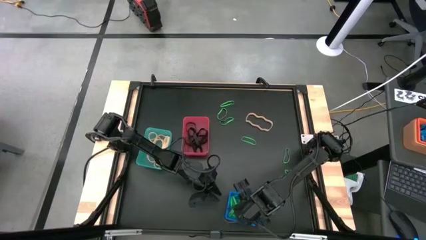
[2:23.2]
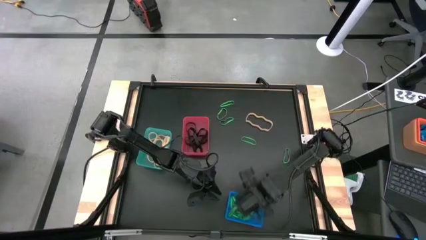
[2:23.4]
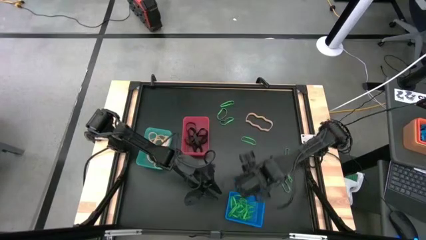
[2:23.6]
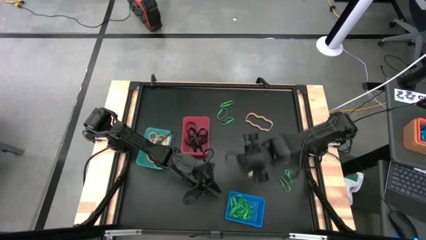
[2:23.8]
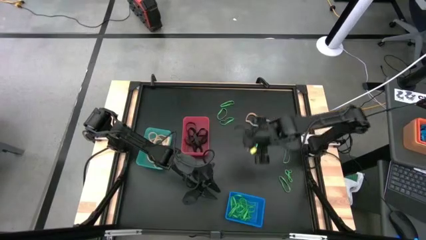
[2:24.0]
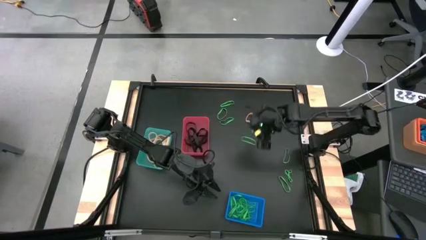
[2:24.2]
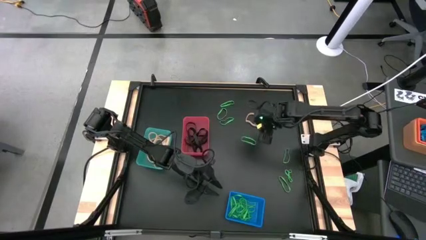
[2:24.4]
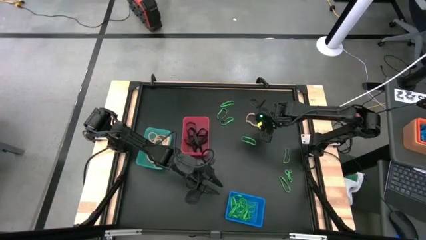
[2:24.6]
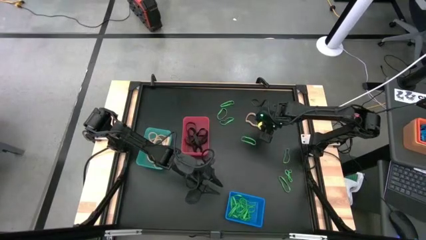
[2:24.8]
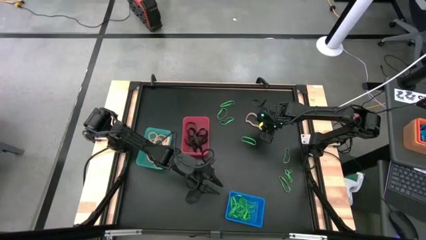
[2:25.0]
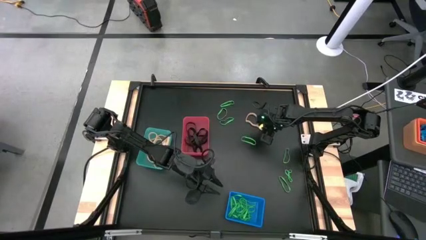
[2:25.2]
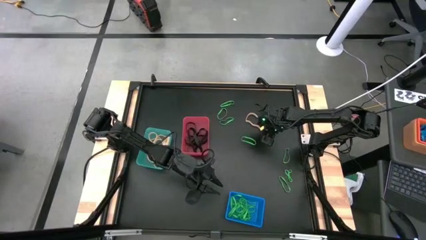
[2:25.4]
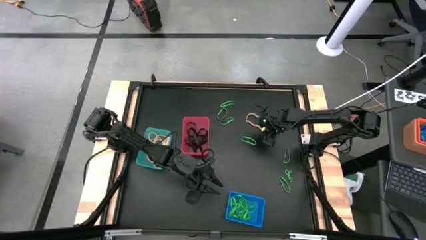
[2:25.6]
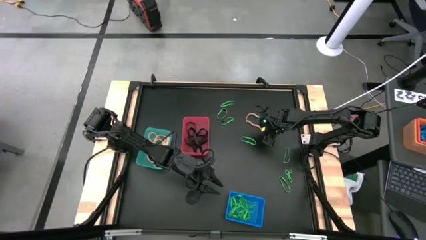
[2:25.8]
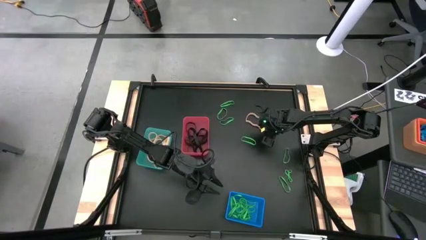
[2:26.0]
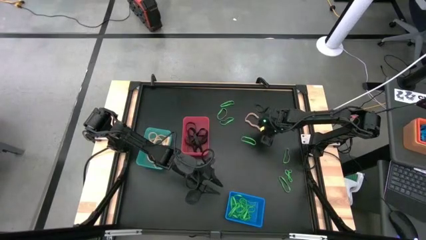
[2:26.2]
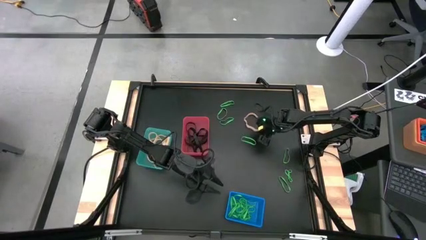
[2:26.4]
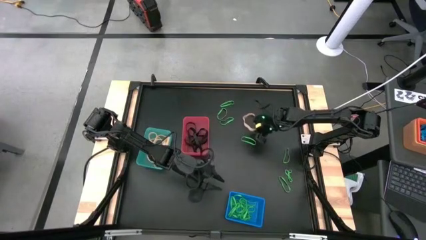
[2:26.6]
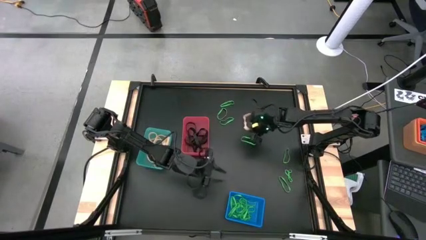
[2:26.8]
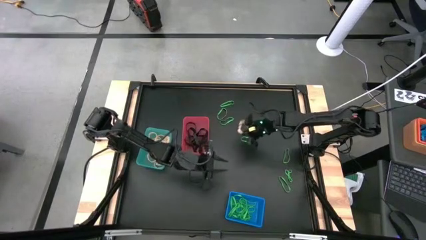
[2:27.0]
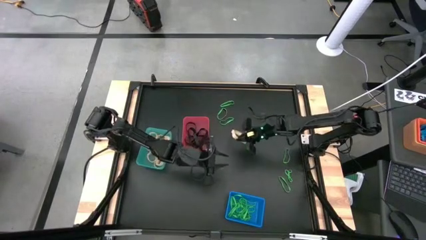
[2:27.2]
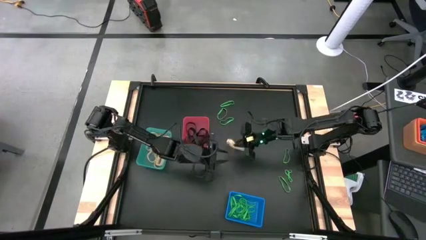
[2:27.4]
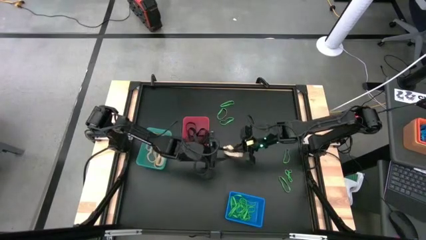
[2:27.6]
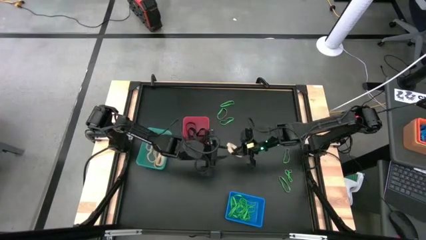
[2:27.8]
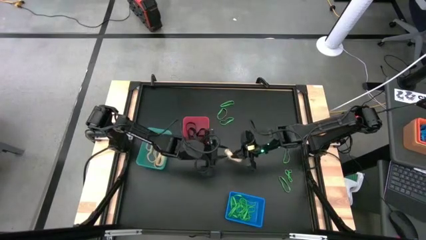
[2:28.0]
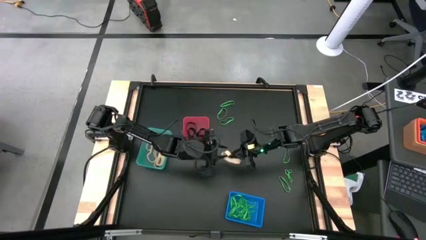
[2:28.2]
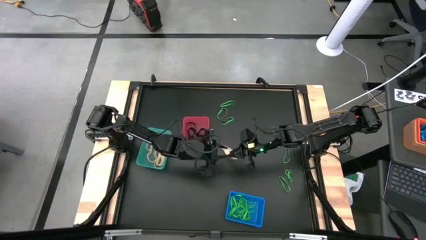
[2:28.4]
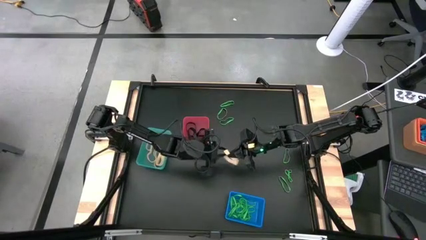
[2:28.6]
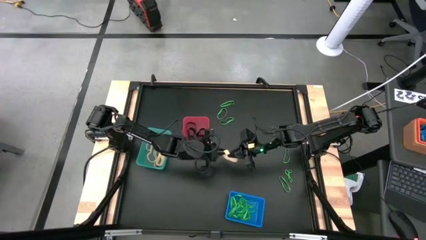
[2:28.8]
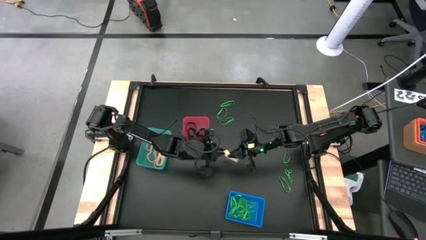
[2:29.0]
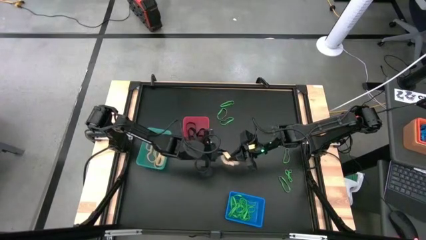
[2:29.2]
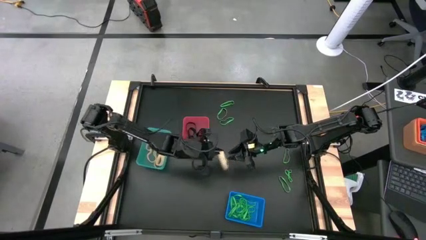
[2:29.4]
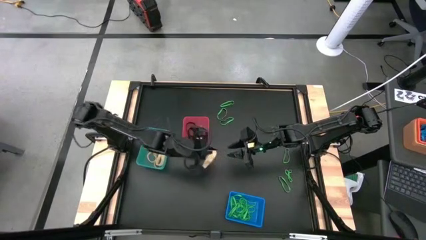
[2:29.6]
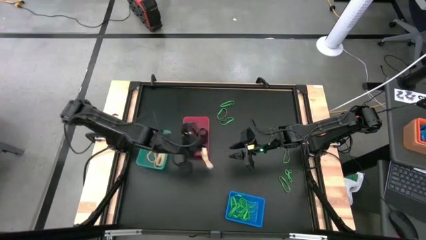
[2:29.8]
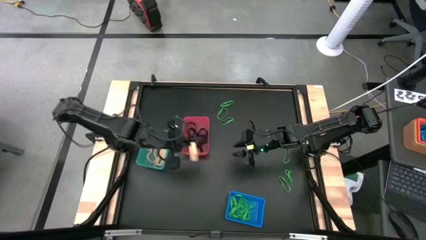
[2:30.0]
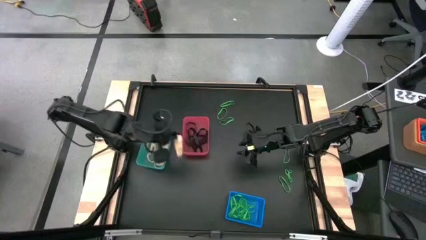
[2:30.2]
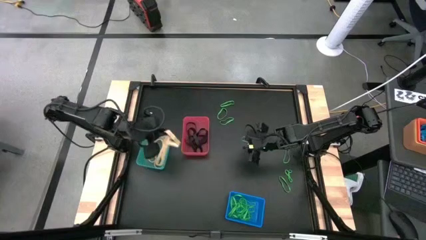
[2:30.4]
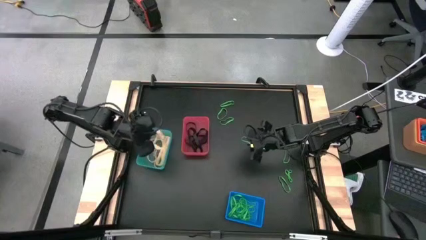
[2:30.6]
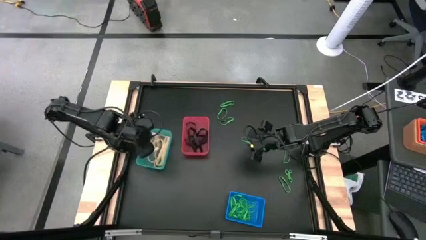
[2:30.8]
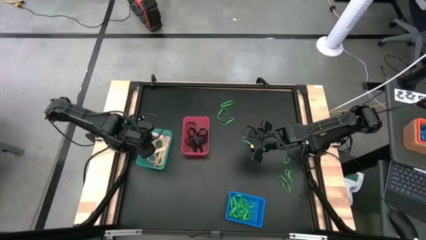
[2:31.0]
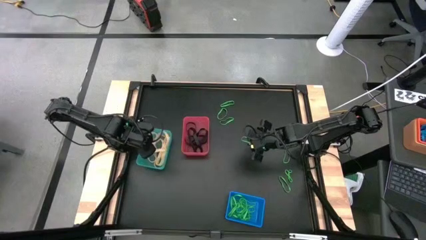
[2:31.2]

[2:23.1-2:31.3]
Task: Sort rubber bands into baskets
Put the light yellow rubber band into the light blue bin

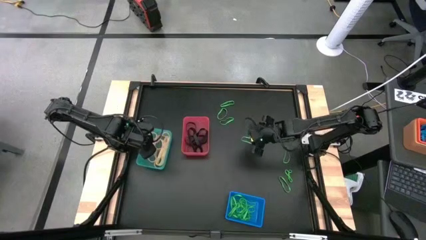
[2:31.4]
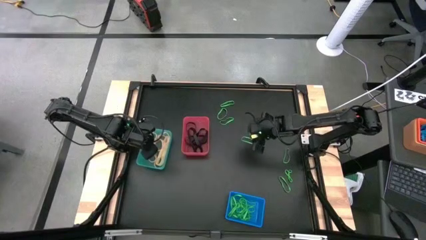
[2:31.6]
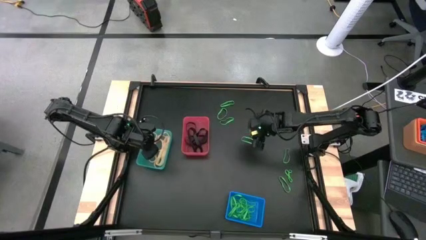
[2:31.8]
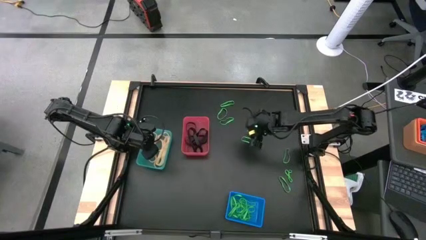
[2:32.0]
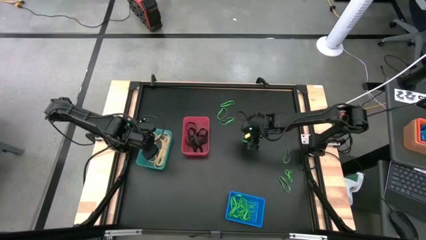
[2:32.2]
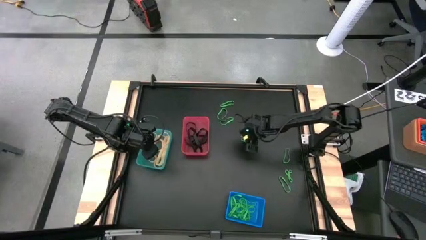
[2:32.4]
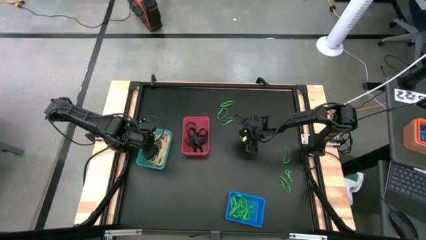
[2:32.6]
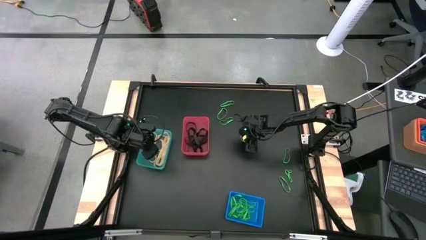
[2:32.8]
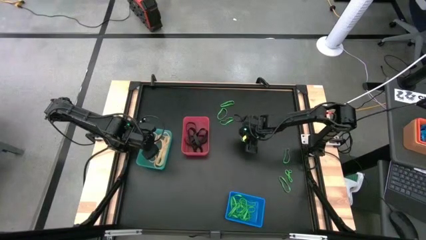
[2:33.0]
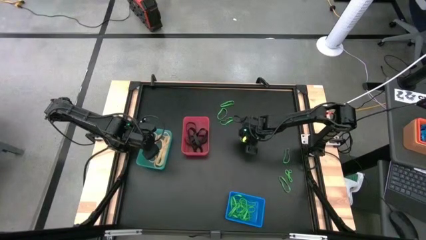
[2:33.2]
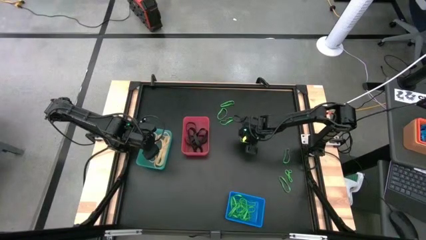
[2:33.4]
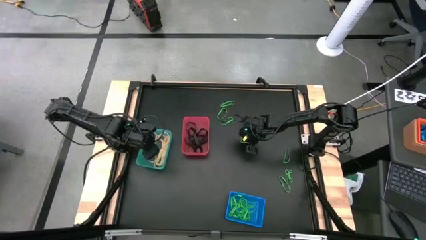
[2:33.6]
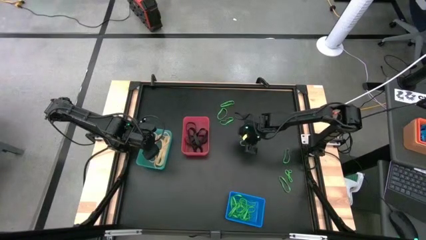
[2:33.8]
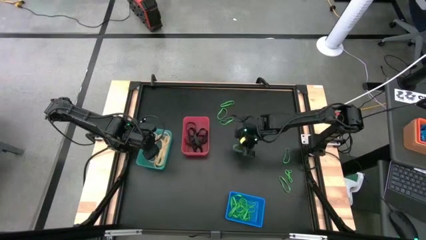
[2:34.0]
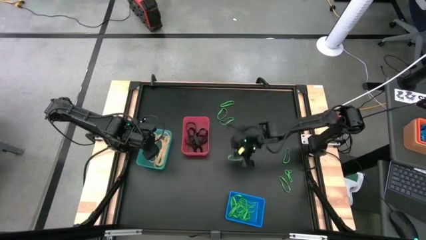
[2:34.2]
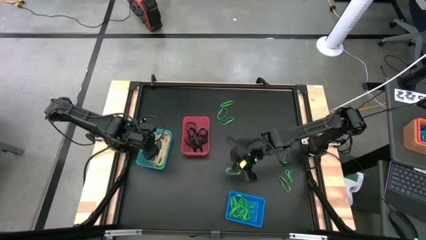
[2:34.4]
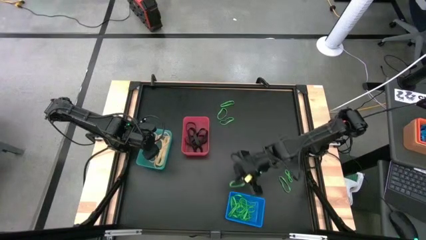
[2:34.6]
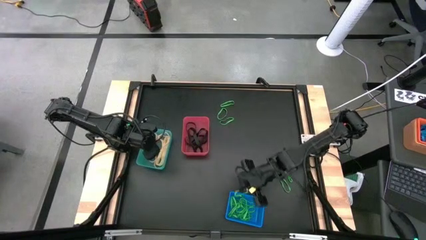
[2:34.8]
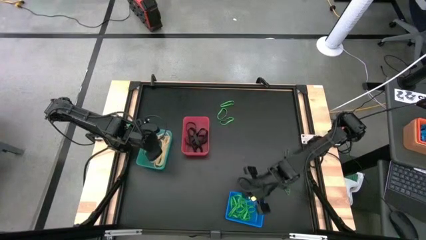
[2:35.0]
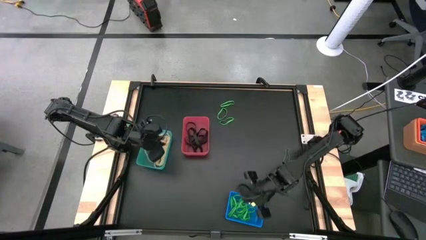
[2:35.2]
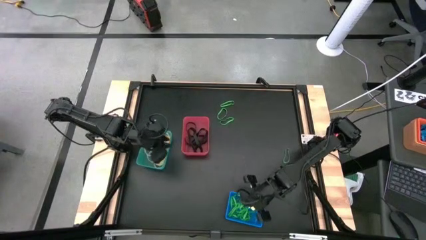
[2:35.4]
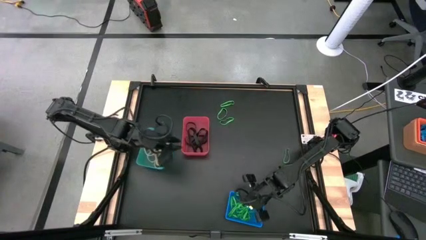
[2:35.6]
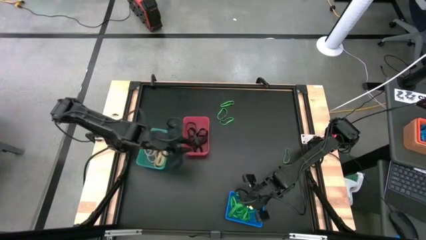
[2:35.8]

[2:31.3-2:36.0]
Put the green rubber band into the blue bin

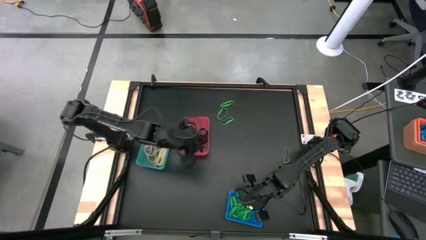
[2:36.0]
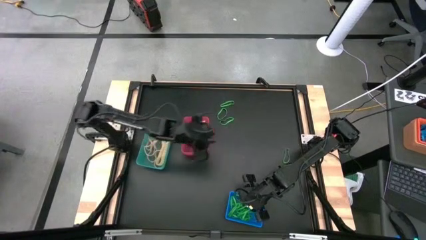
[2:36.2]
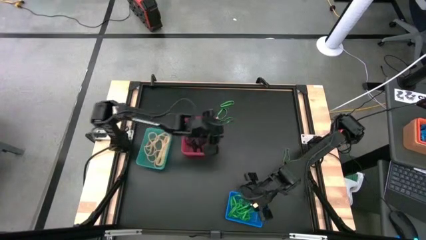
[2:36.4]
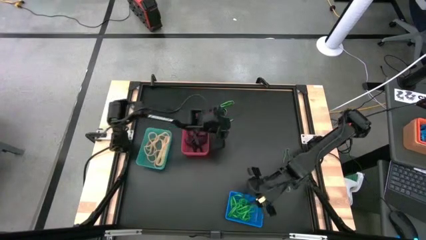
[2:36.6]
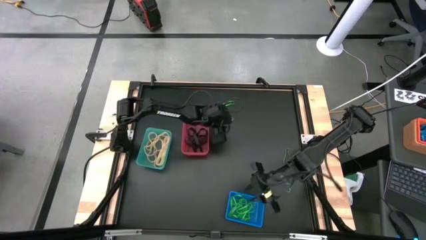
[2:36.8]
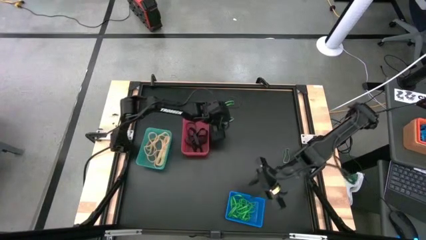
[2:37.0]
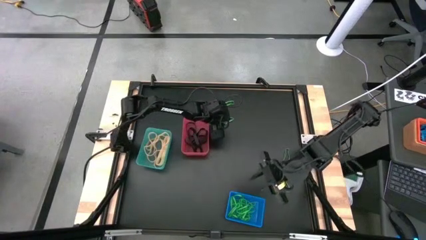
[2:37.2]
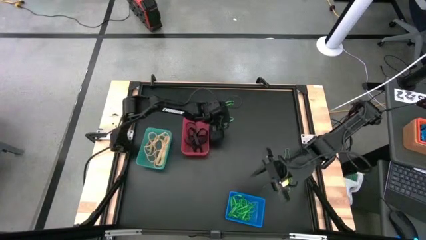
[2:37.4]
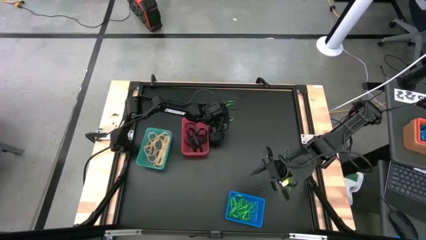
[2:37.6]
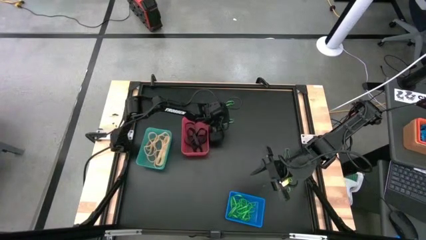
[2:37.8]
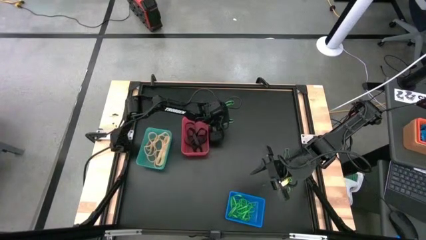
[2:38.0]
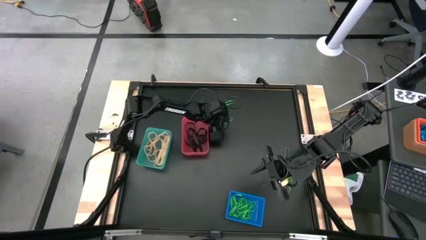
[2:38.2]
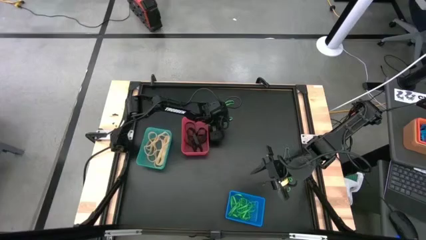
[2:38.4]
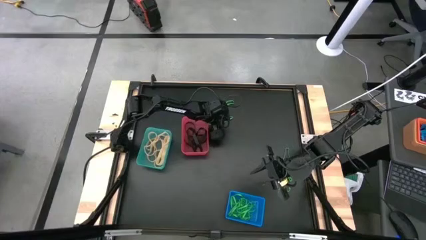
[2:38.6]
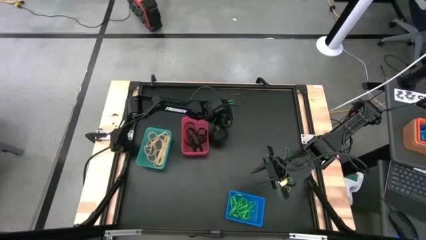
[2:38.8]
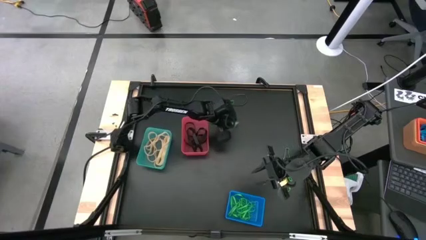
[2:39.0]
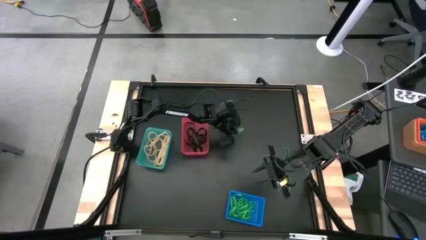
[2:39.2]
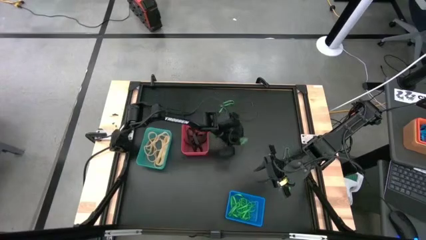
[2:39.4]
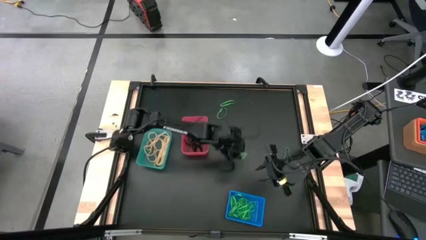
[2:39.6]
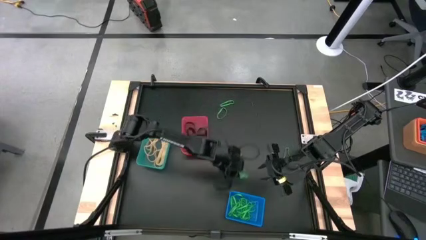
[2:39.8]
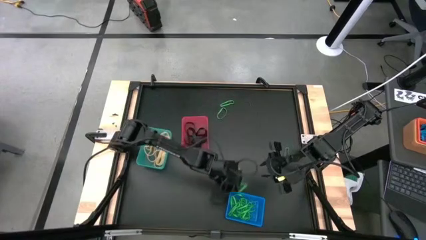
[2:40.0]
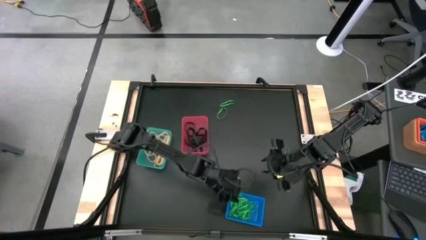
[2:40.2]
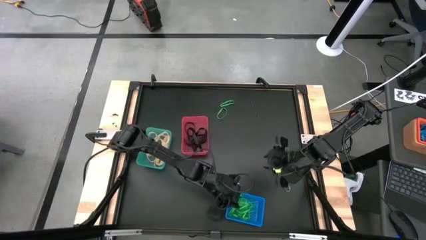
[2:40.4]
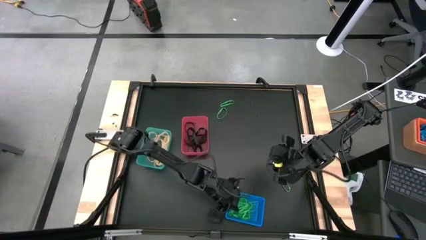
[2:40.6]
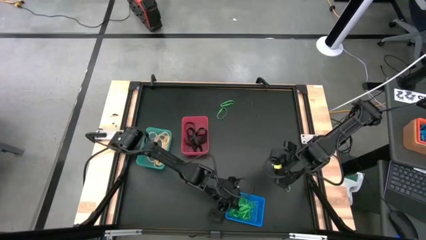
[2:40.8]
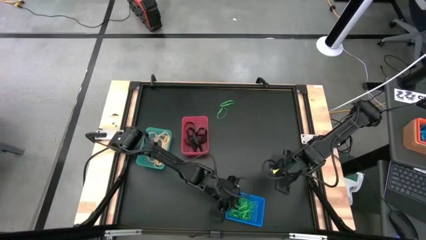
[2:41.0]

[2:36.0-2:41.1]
Put the green rubber band into the blue bin
